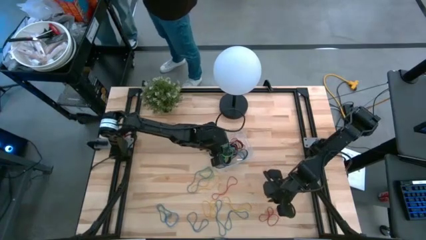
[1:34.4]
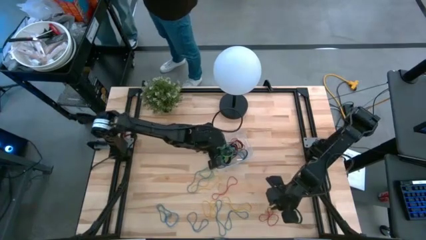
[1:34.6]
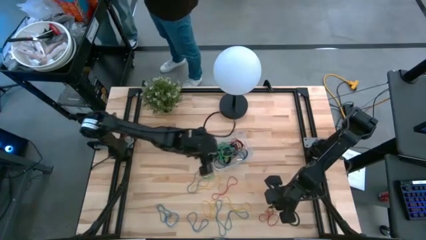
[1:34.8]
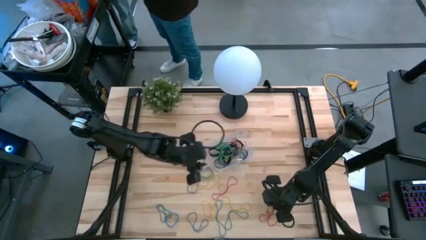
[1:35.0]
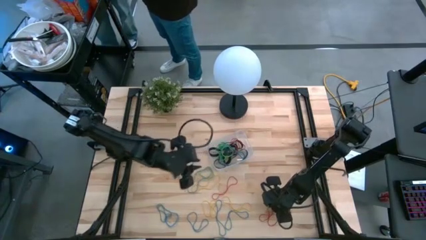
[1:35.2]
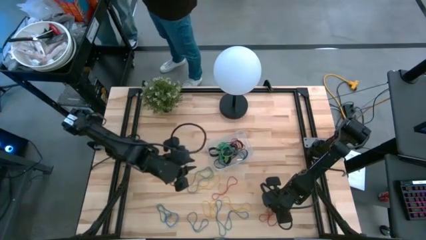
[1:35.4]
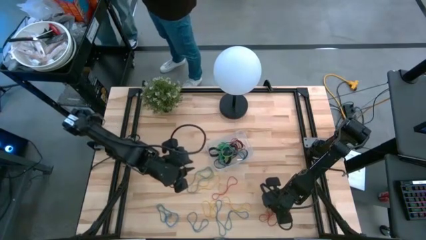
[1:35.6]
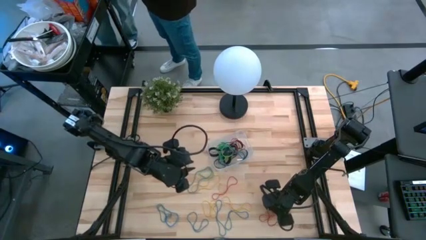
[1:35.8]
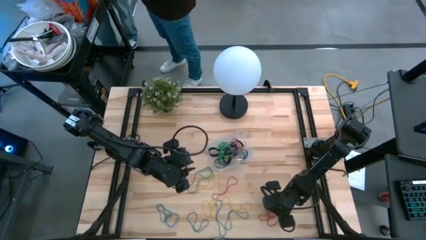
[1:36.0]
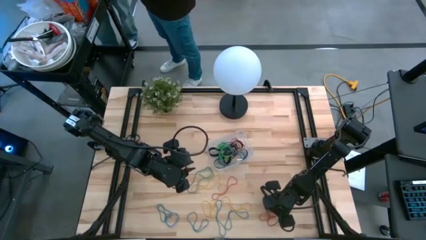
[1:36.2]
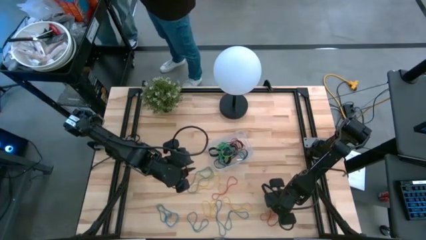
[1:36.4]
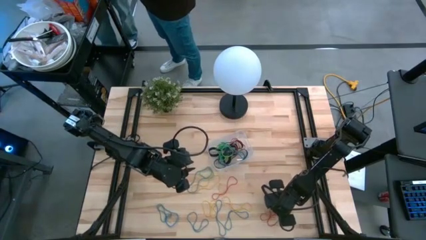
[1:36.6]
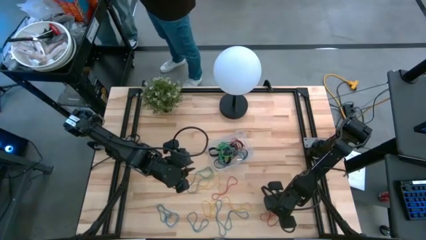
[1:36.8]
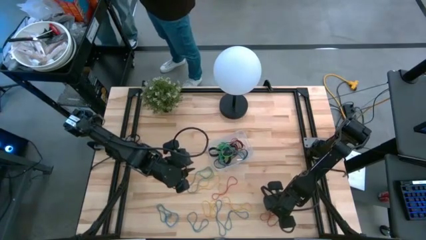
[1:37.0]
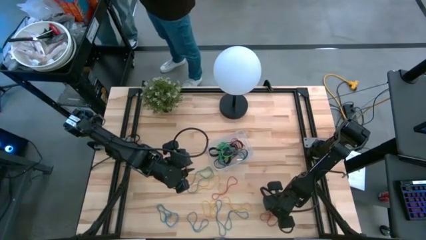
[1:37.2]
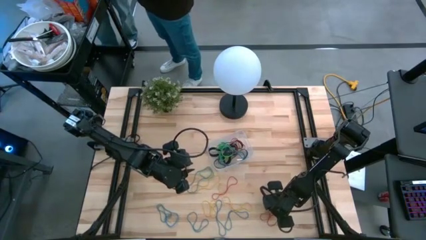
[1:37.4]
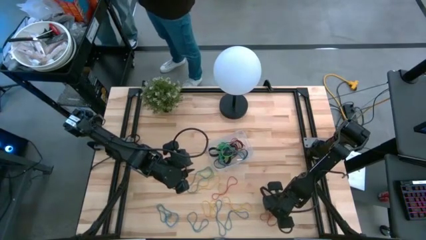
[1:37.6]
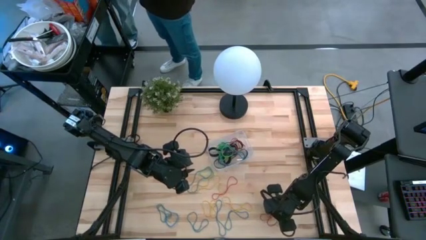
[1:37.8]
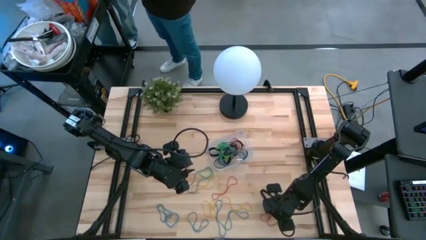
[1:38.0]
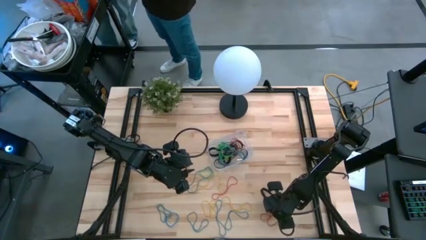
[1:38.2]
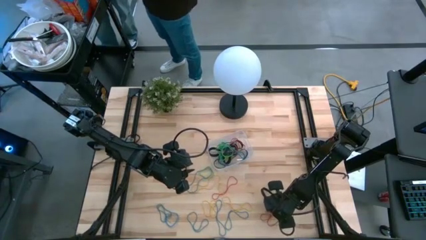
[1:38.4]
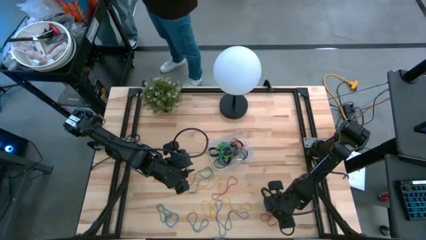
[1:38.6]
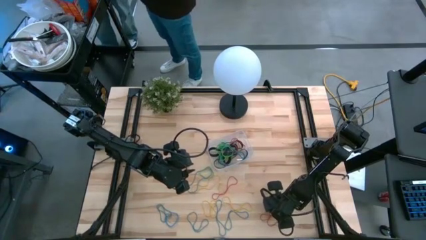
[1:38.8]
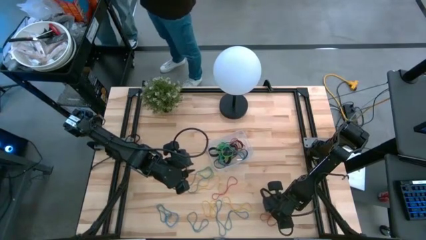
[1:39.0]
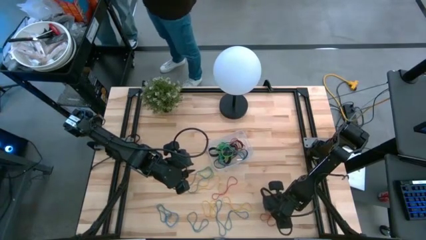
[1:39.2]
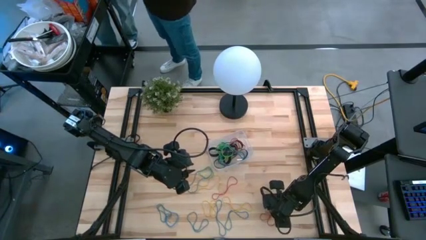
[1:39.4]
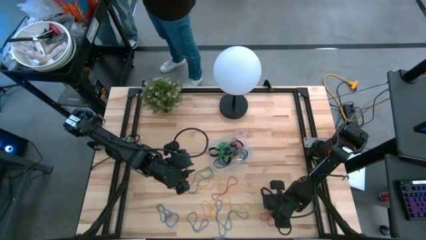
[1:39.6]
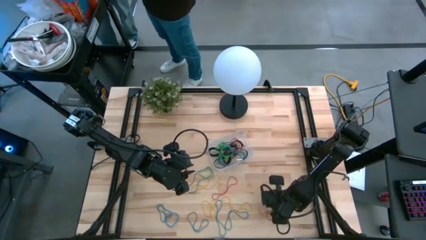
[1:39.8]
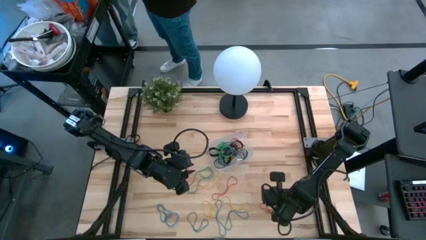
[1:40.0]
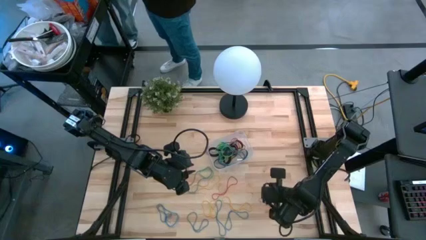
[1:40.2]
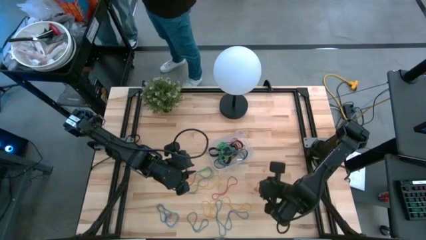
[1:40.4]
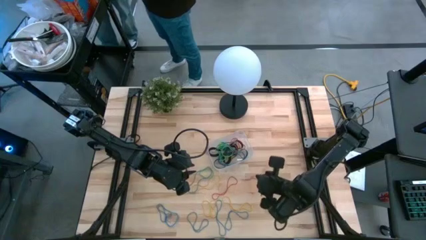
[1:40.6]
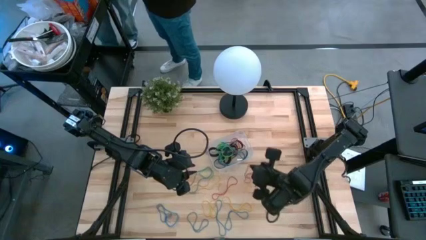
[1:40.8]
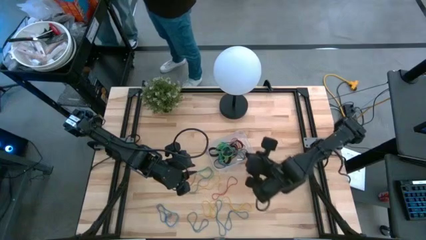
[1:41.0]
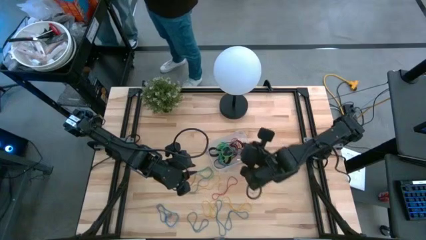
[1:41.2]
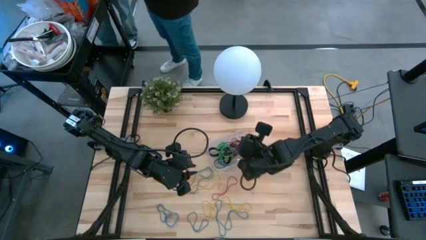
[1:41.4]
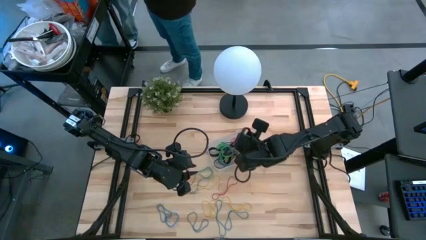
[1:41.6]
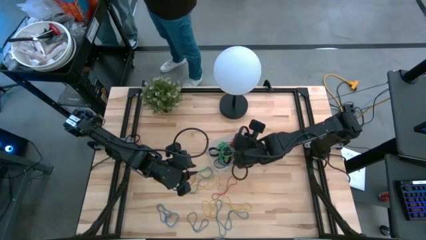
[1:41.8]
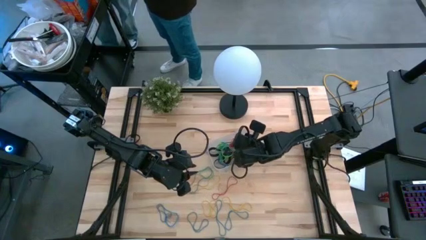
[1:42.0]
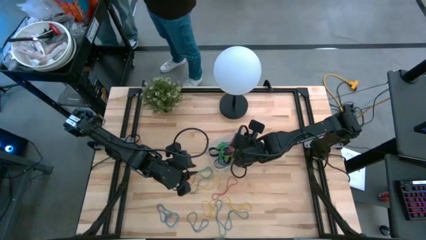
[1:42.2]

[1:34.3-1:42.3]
Task: Pick and place rubber bands into bin
Put the red rubber band into the transparent bin

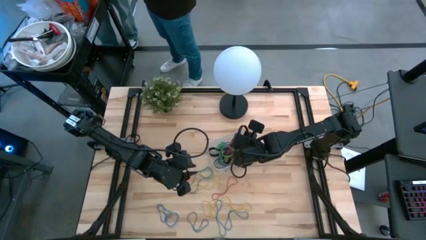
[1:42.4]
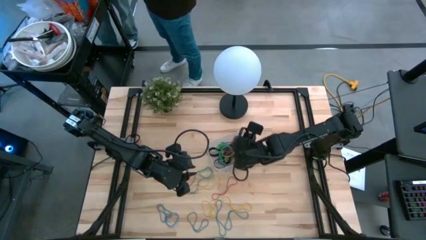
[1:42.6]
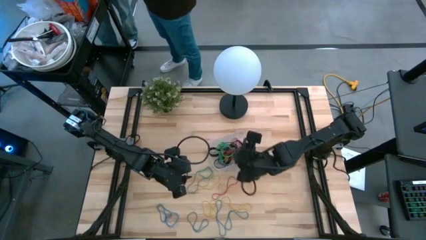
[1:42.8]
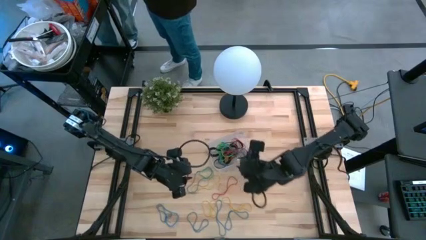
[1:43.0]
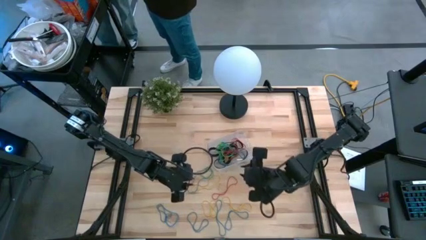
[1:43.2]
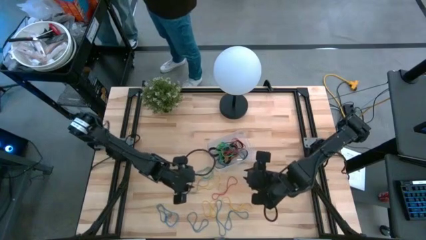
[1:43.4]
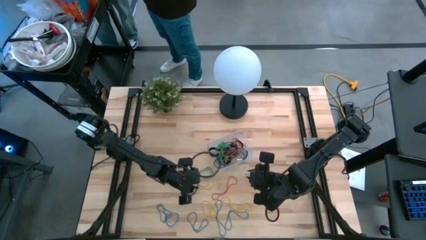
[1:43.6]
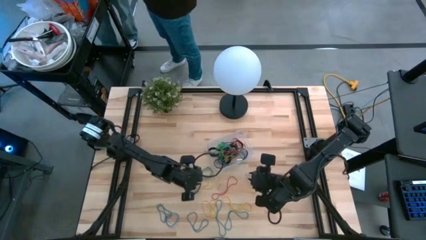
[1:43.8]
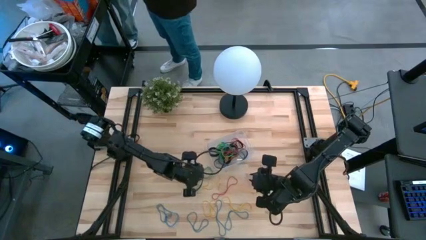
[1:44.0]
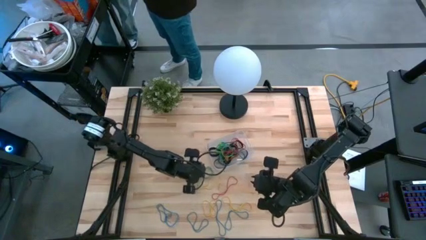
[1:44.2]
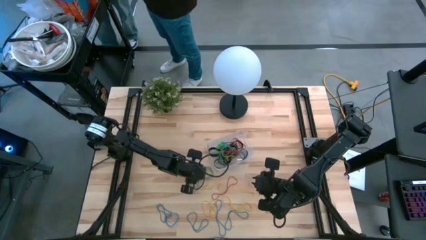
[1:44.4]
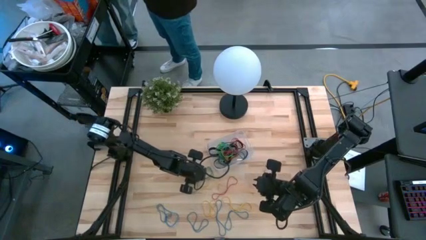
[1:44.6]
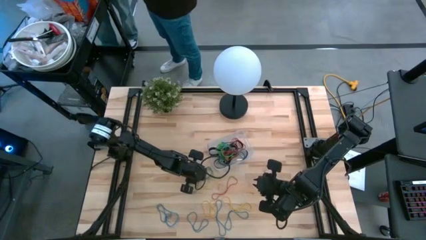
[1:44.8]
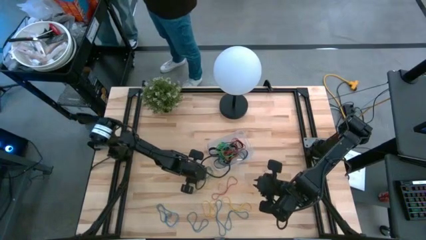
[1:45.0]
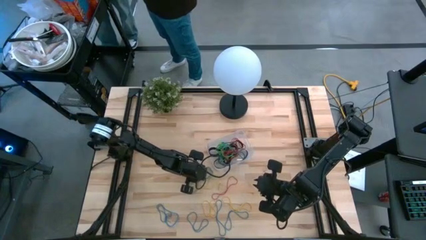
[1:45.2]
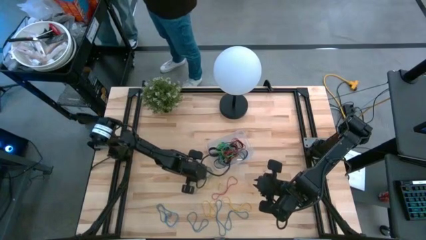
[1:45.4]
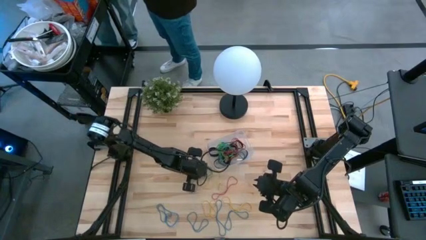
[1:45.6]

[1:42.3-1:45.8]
Put the green rubber band into the transparent bin

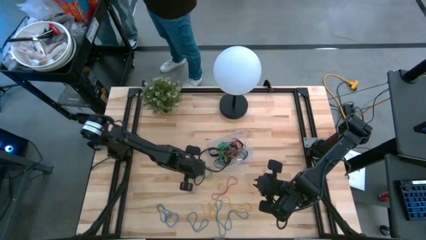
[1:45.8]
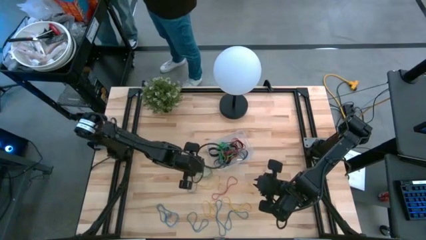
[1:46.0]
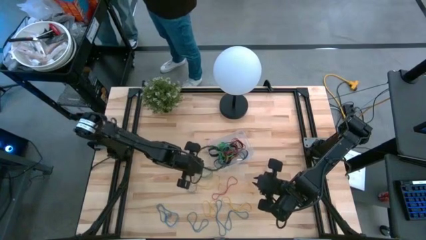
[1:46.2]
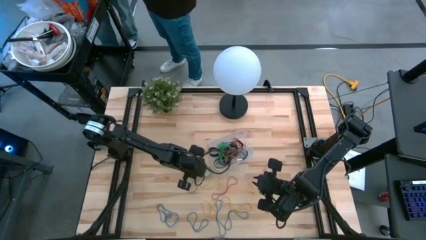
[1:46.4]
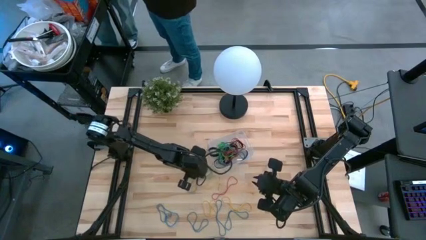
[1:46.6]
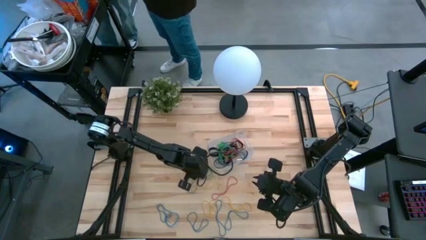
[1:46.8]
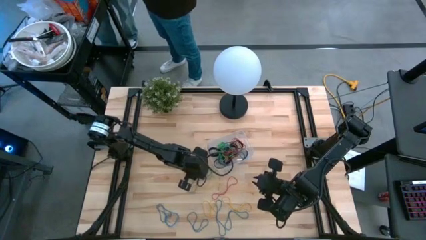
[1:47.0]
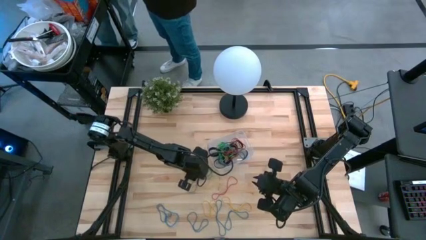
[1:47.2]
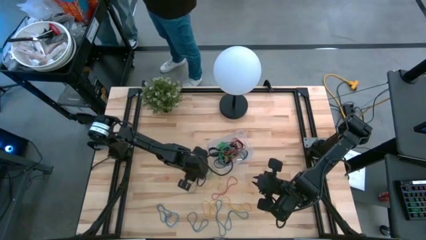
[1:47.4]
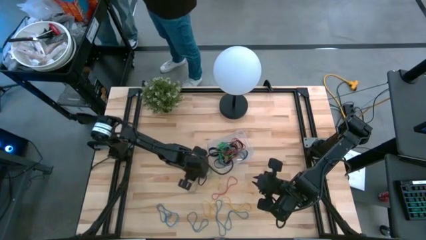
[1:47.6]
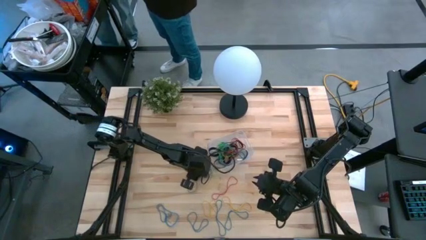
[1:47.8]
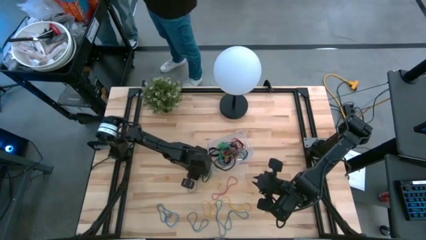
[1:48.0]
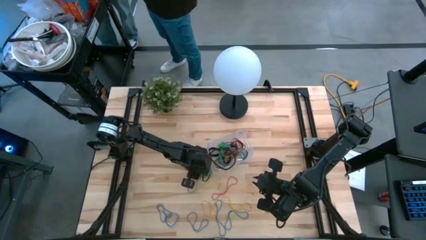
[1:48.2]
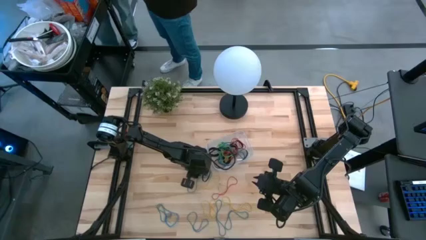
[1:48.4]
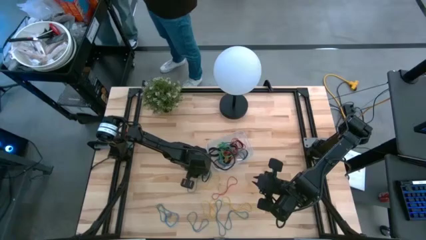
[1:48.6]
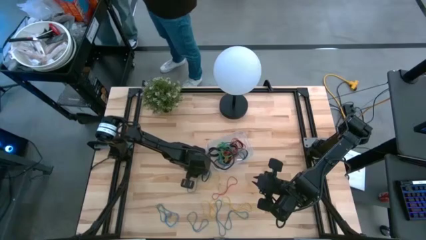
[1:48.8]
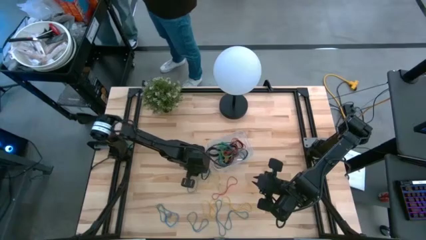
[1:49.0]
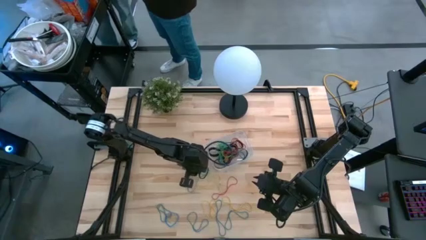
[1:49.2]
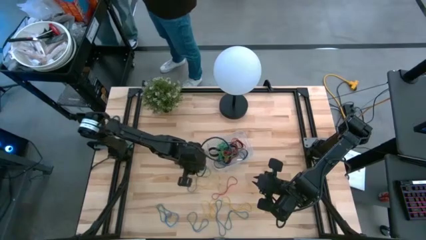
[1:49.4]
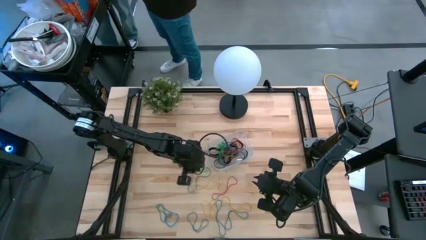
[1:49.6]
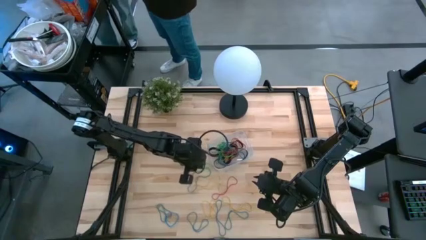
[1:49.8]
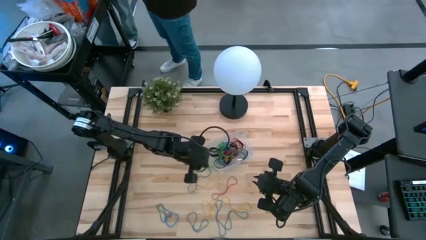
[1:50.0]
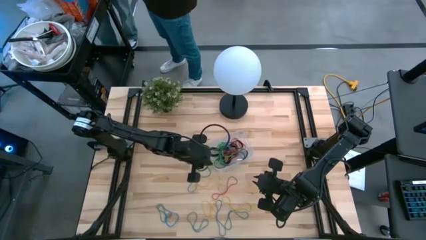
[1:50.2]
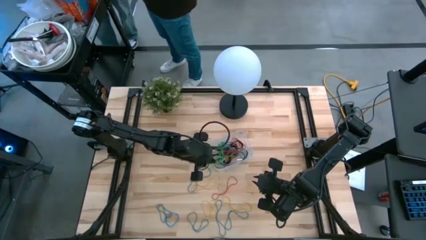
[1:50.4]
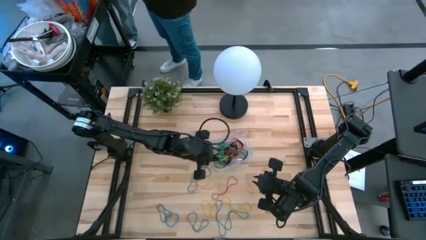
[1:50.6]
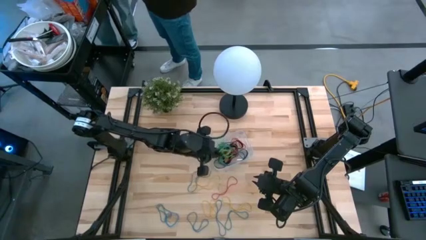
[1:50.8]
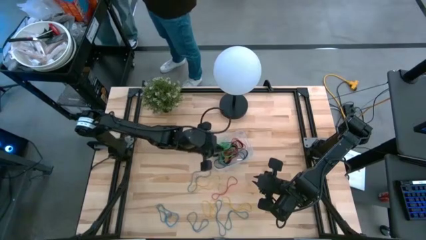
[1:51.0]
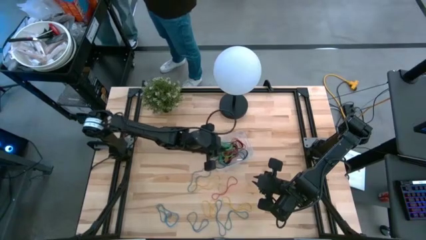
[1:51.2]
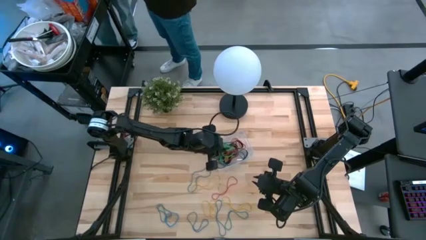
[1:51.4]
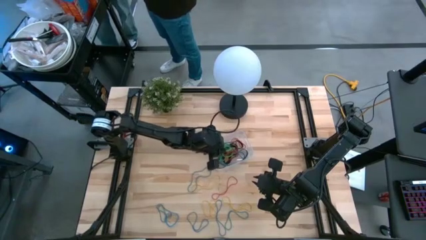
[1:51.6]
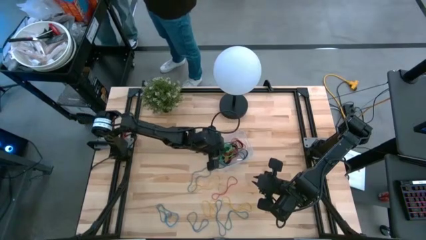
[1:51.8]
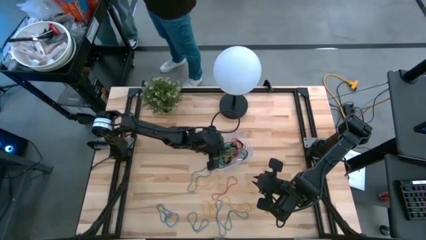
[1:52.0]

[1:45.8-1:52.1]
Put the green rubber band into the transparent bin
